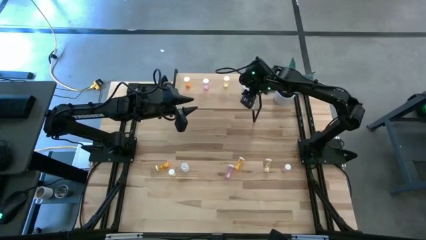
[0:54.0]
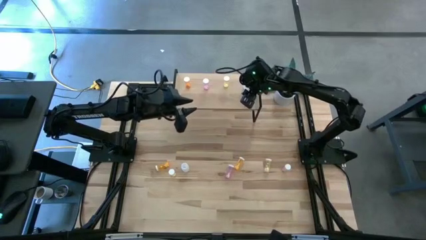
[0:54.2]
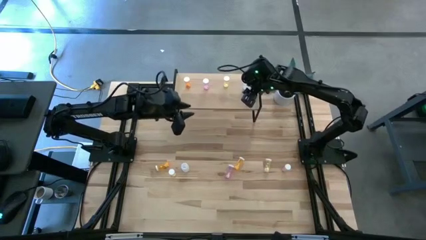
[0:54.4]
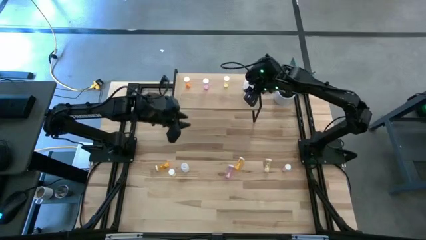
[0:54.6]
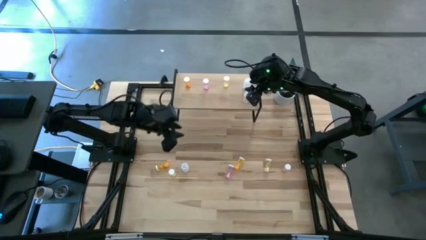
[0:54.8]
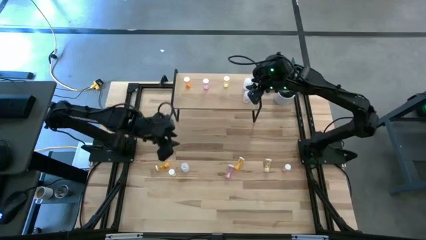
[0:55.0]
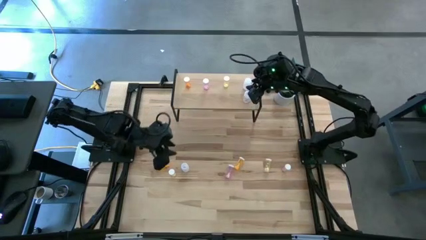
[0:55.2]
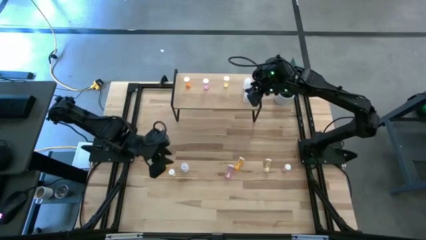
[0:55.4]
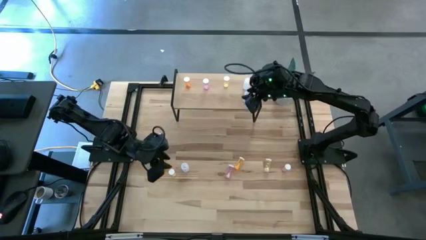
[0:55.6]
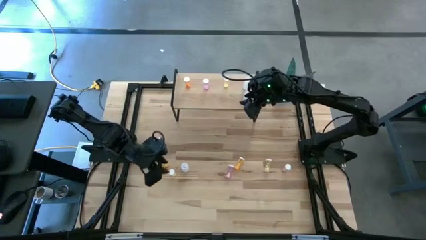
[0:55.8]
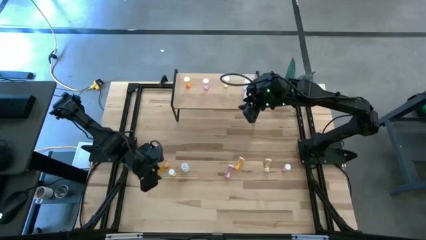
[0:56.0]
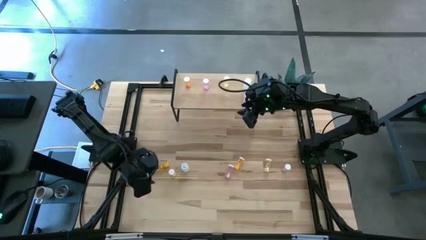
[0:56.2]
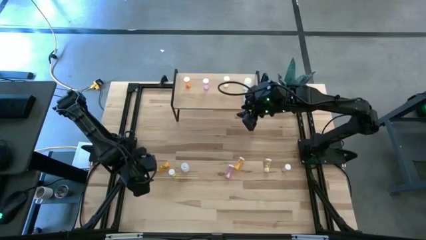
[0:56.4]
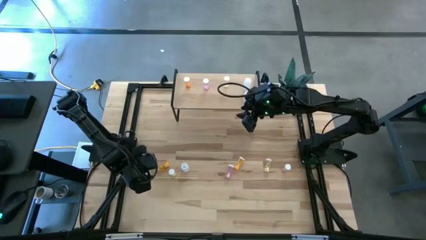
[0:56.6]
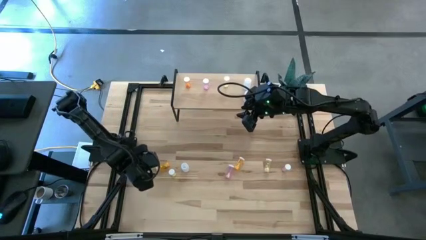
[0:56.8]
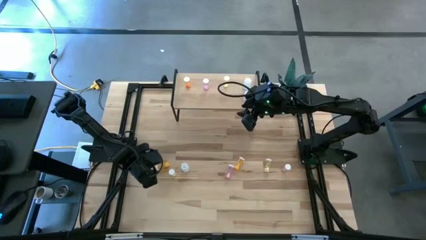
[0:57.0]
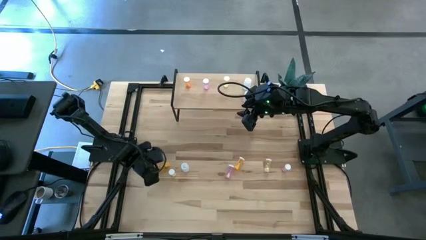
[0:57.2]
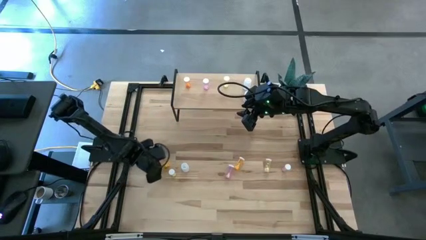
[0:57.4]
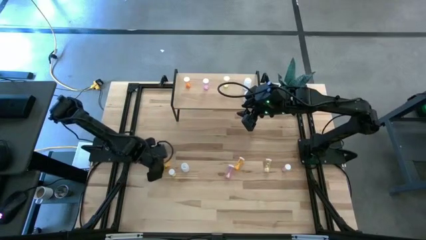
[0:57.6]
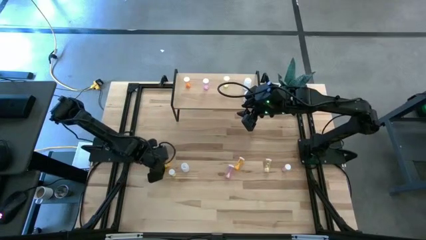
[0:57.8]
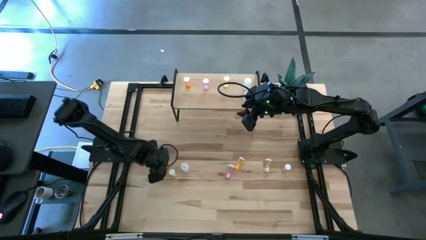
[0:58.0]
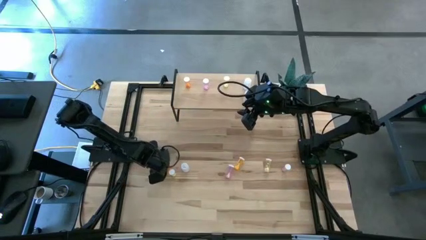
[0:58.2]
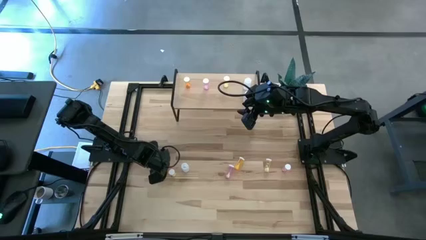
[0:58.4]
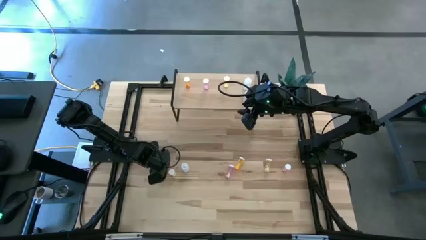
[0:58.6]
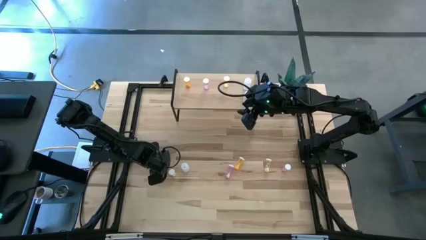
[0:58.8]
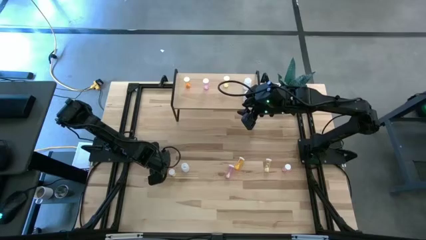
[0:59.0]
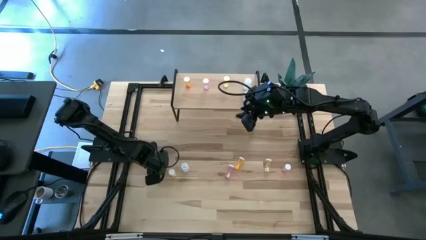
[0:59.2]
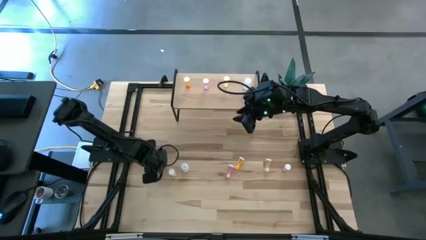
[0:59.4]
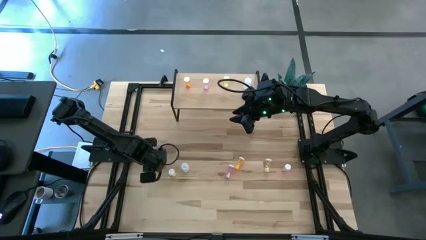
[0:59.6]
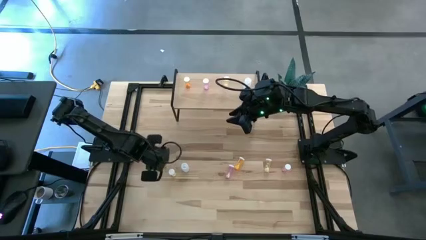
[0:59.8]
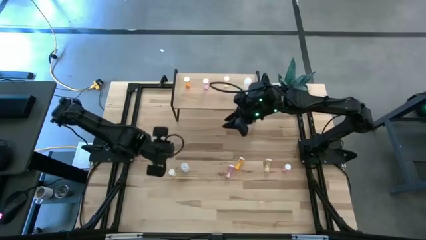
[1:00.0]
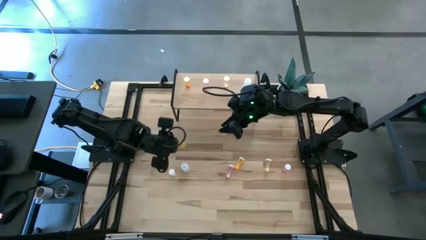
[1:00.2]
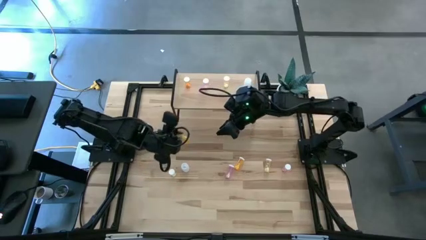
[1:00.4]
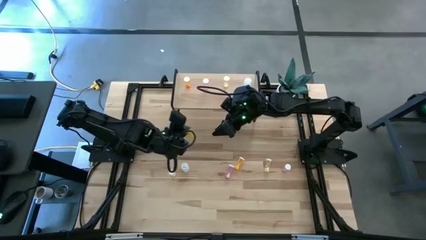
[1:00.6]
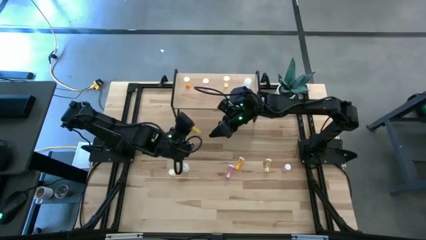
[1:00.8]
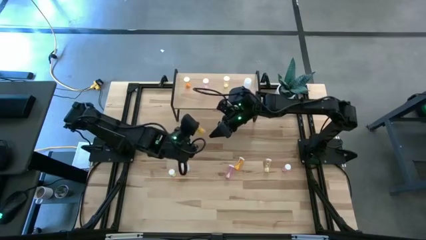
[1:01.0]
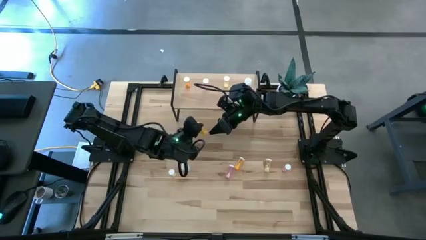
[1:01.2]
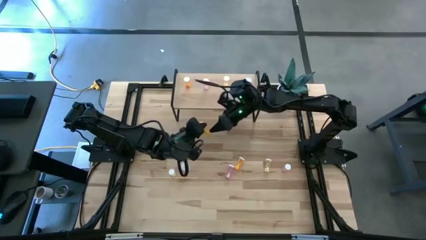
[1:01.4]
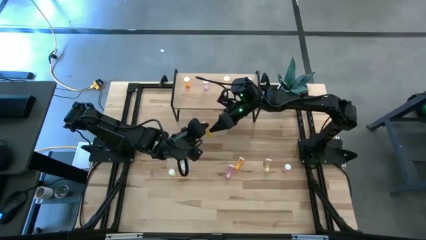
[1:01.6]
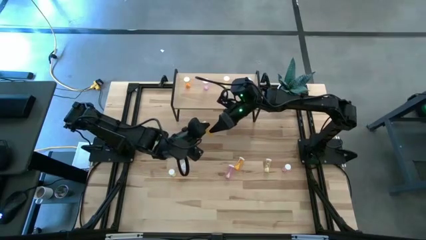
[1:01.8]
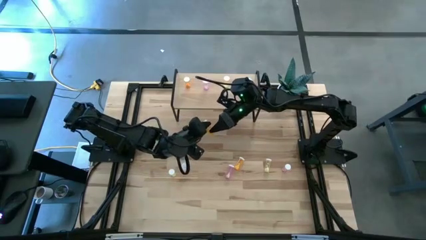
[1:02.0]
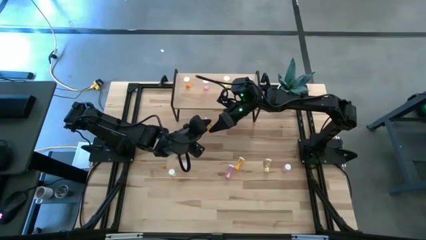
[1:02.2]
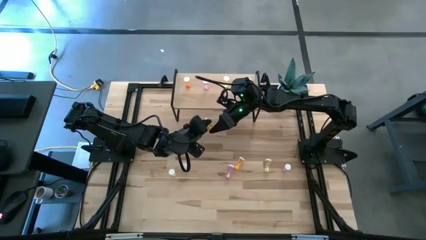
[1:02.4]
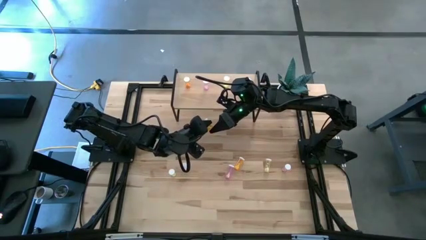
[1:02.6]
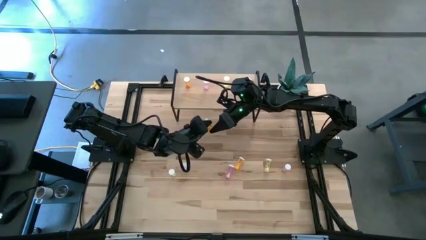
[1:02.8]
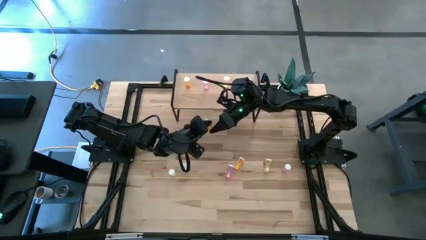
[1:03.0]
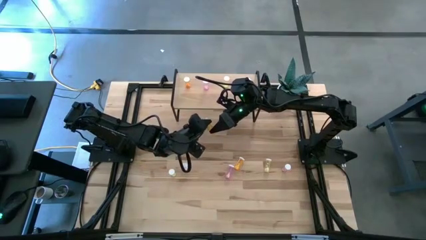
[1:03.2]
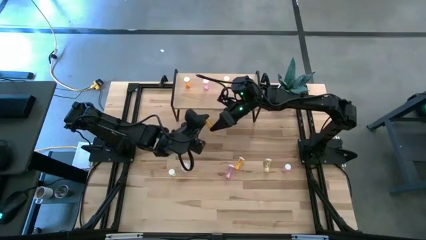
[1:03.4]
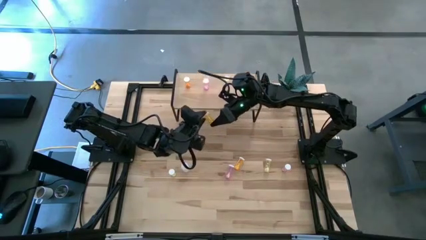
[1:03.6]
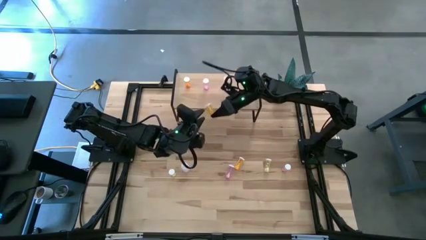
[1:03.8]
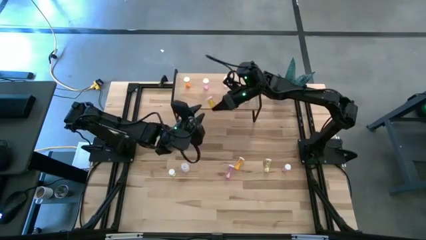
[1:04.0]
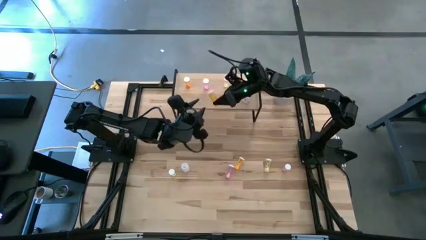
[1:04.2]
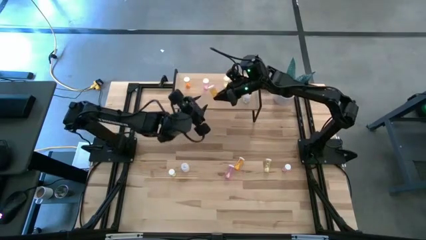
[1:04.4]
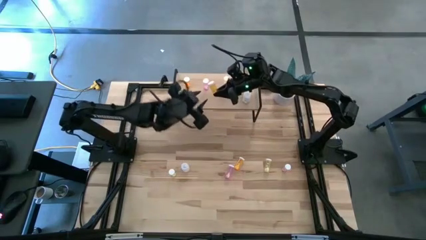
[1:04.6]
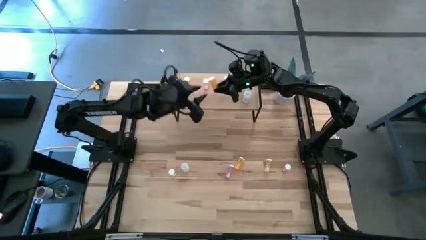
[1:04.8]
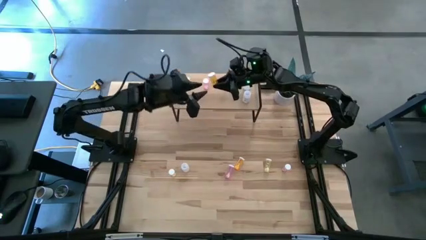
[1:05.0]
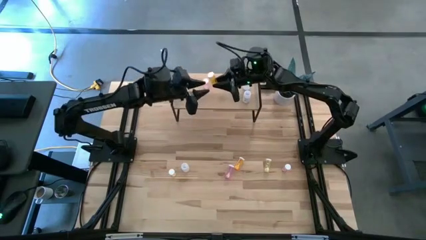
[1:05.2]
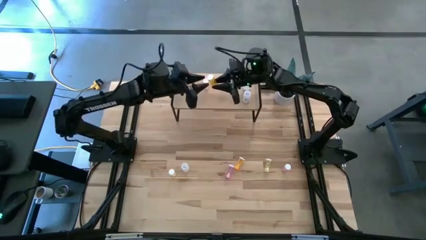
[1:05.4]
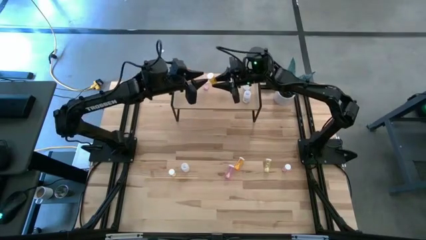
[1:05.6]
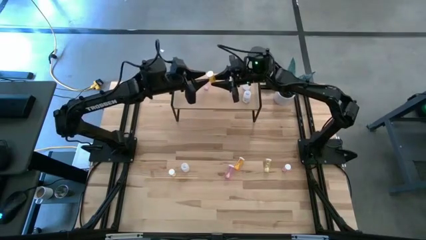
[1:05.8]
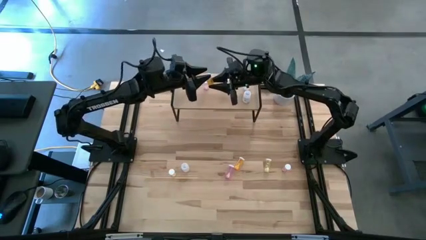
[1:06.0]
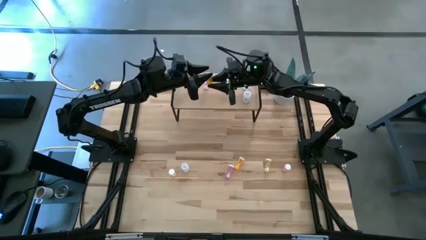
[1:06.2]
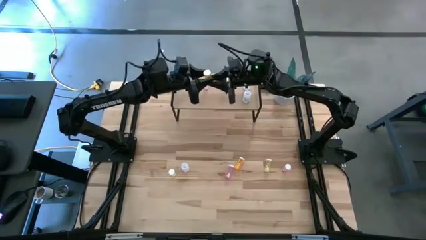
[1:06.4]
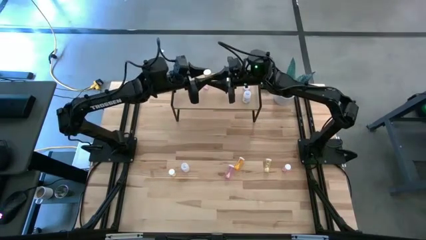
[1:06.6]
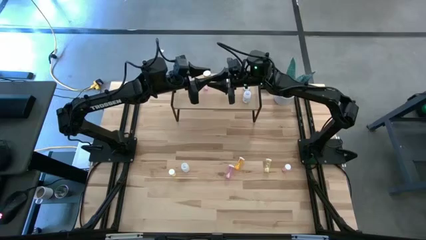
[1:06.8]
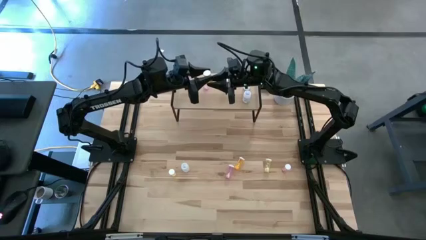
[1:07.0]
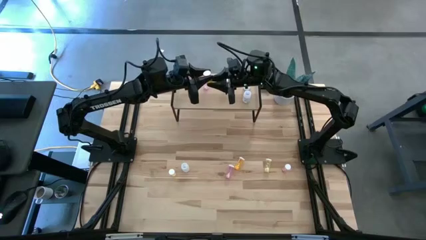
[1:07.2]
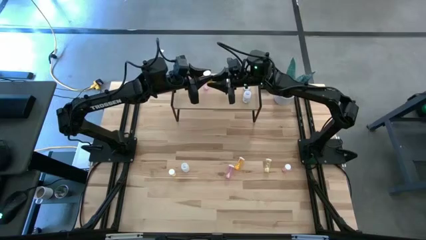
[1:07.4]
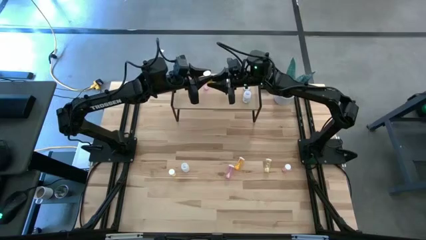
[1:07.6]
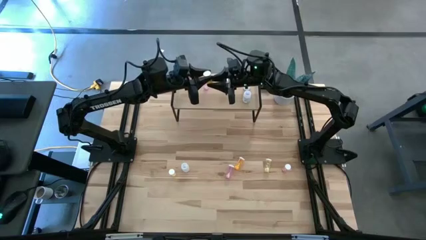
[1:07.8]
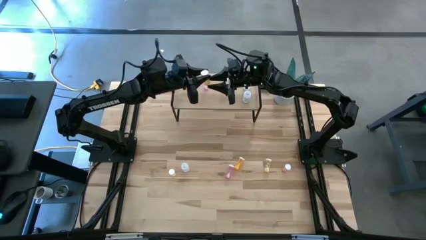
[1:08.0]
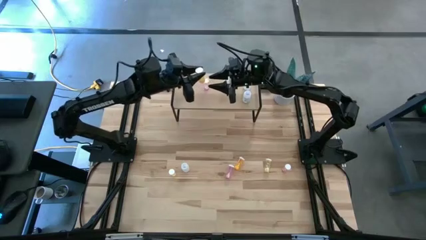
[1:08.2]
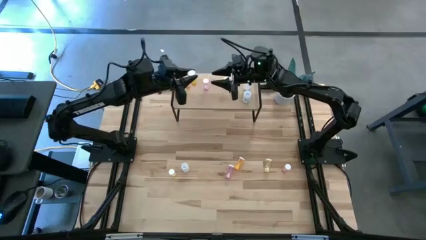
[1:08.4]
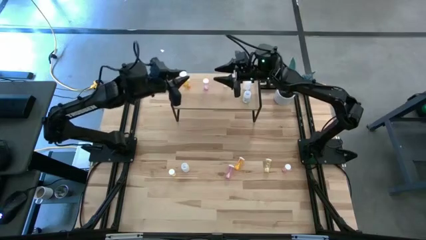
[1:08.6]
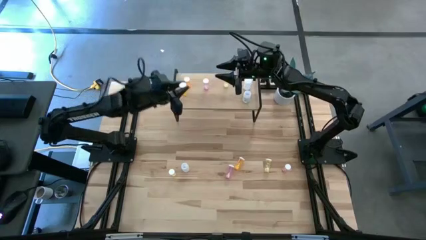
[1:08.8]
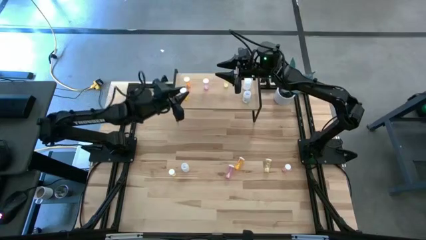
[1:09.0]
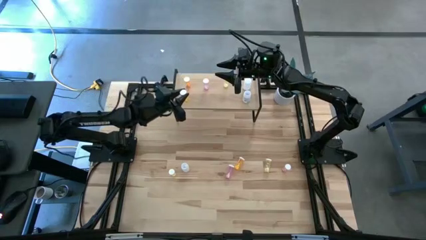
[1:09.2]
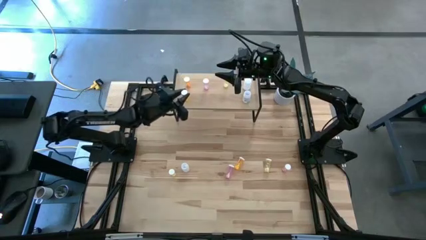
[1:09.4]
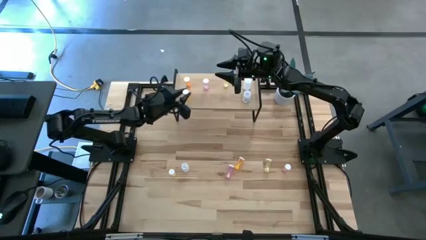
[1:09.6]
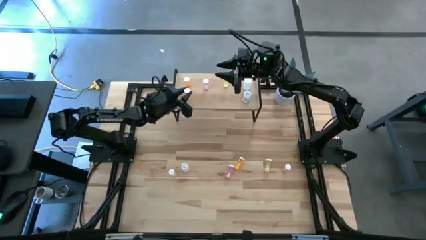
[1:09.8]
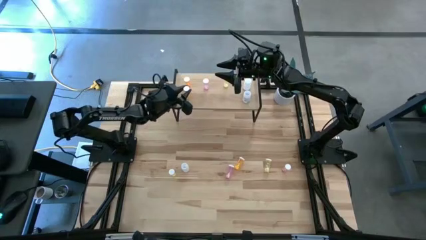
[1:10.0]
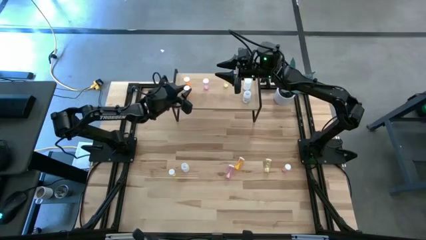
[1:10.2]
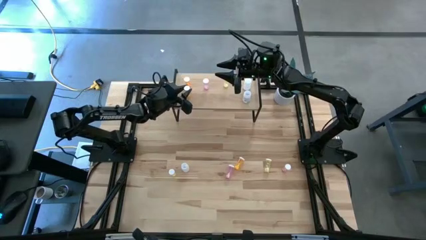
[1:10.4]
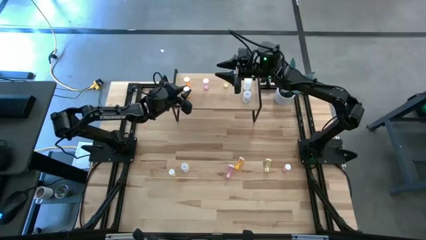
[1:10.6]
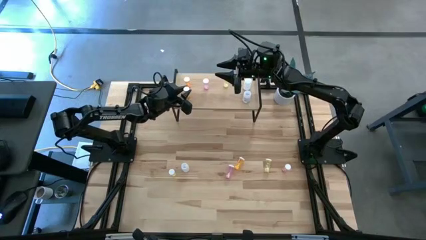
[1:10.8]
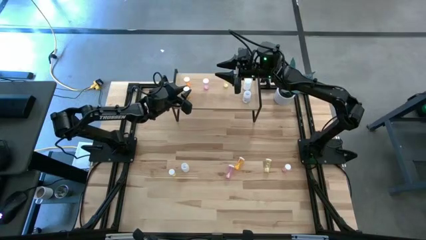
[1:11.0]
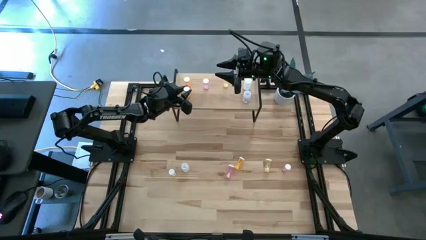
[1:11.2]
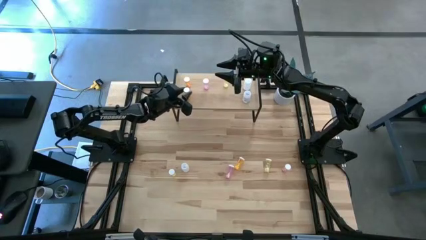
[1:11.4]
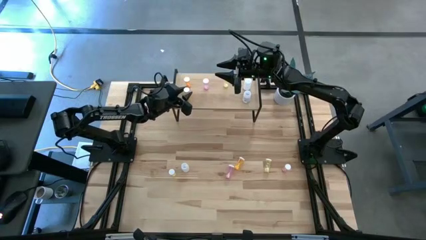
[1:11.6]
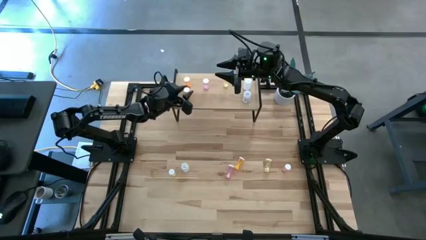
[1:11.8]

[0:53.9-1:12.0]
Task: Pick and place medicine bottles onto shelf by color
Put the left orange pill bottle on the shelf aligned with the other orange pill bottle
